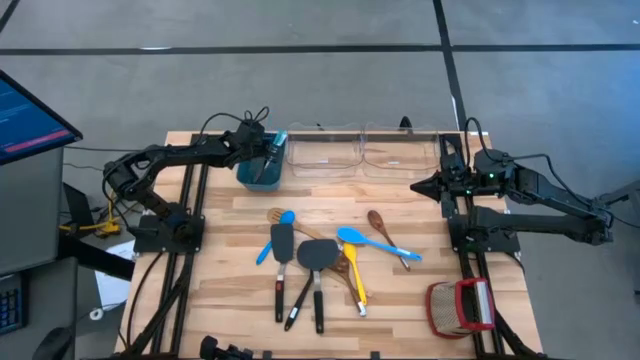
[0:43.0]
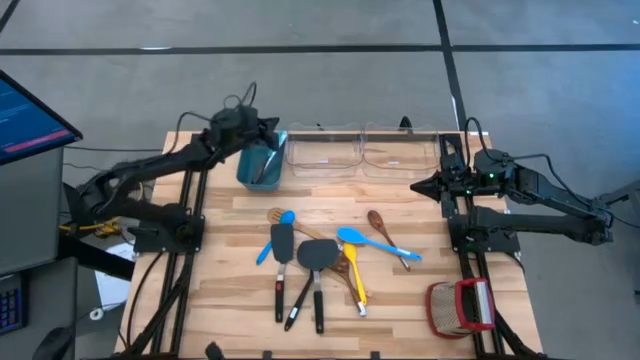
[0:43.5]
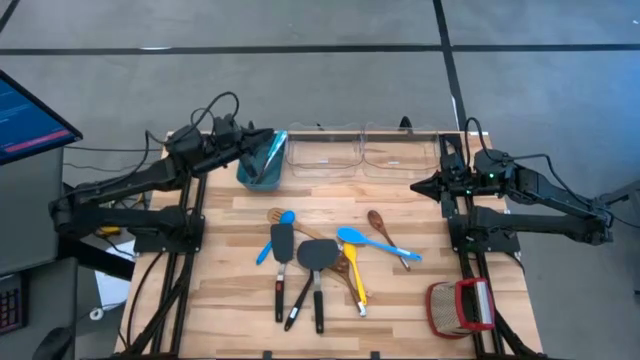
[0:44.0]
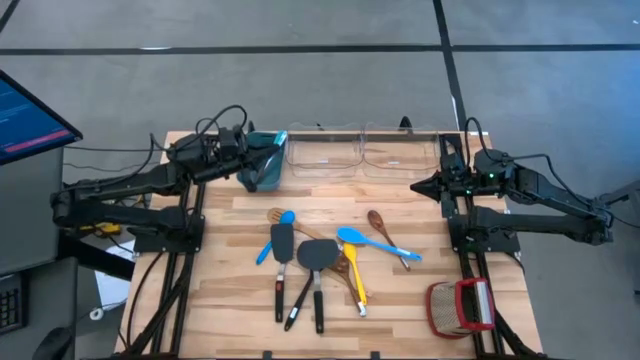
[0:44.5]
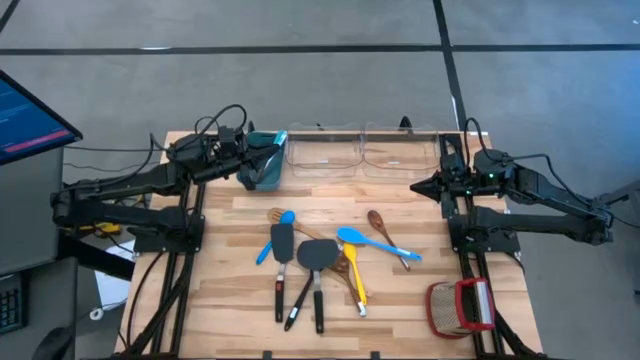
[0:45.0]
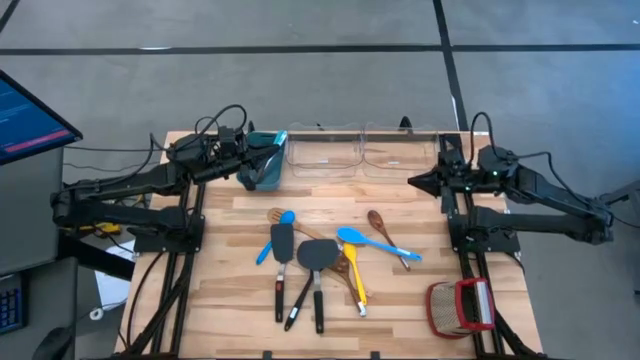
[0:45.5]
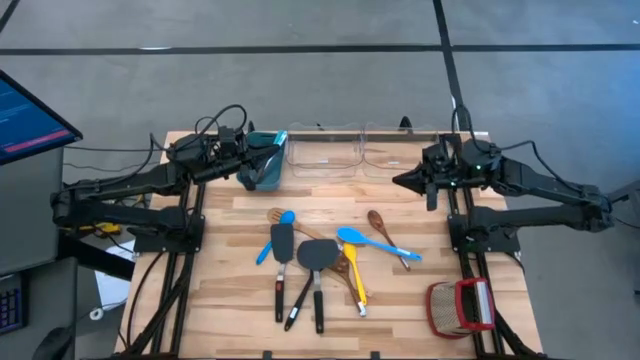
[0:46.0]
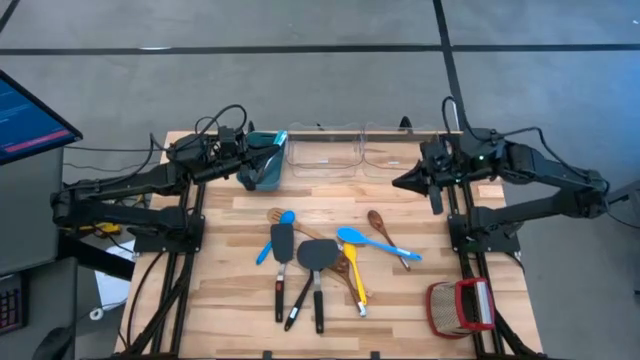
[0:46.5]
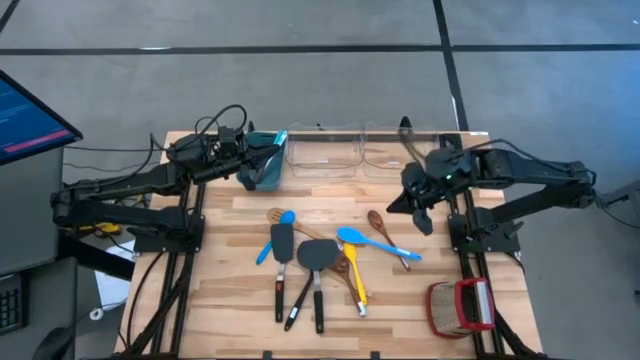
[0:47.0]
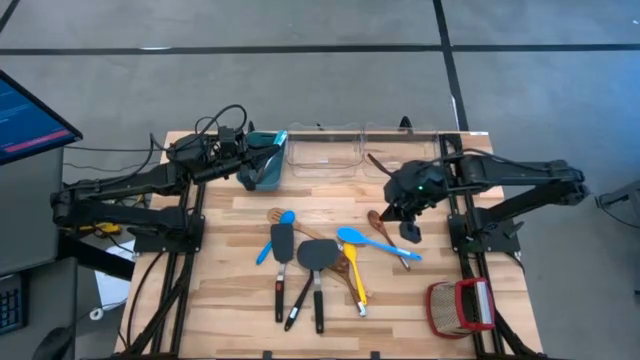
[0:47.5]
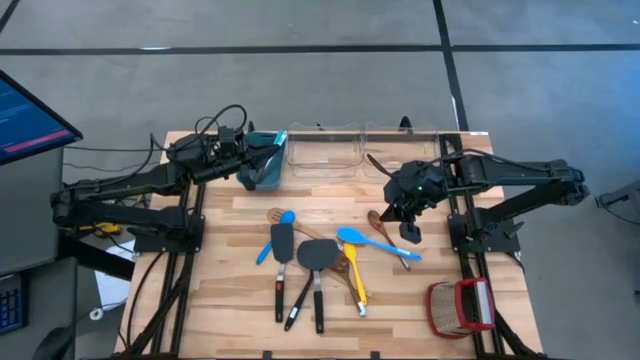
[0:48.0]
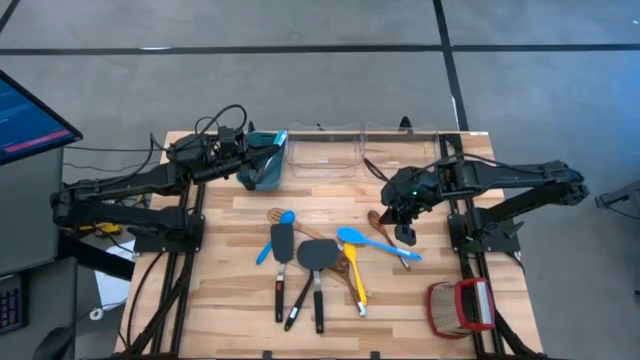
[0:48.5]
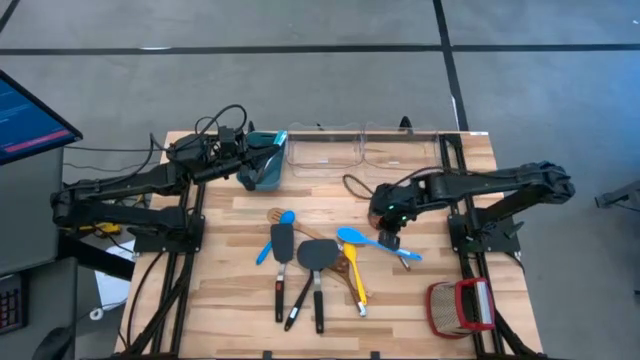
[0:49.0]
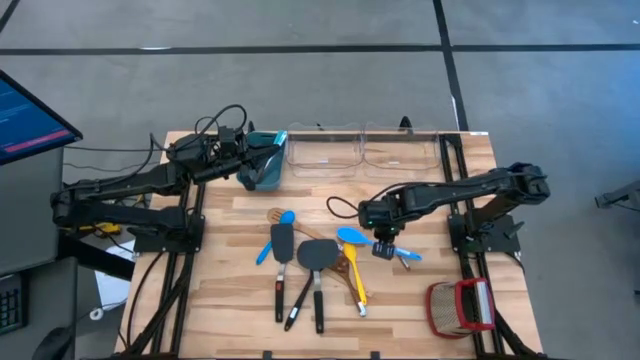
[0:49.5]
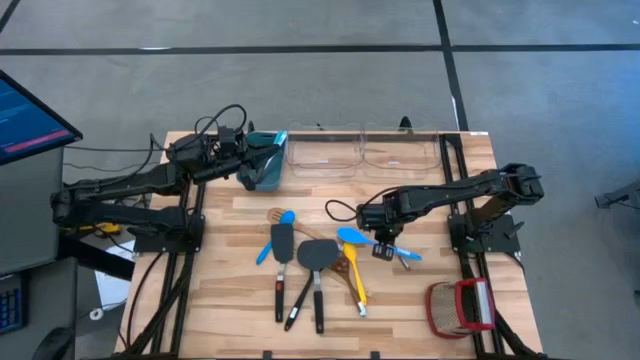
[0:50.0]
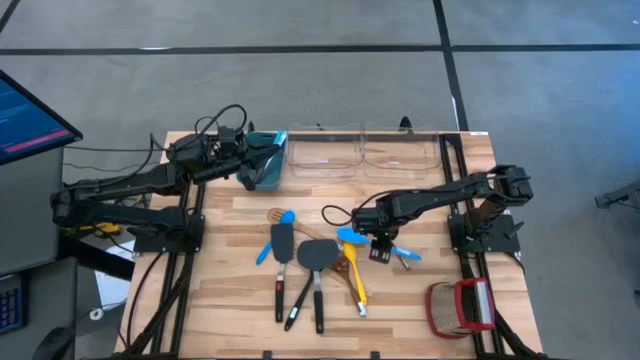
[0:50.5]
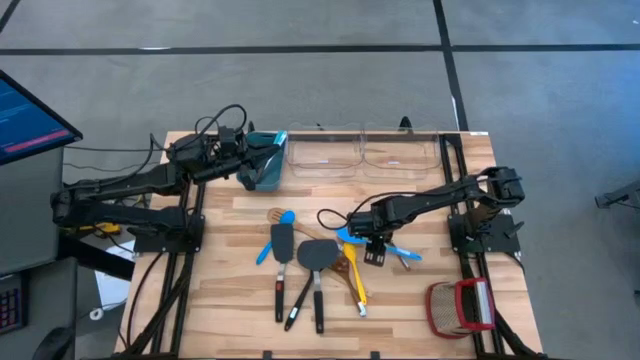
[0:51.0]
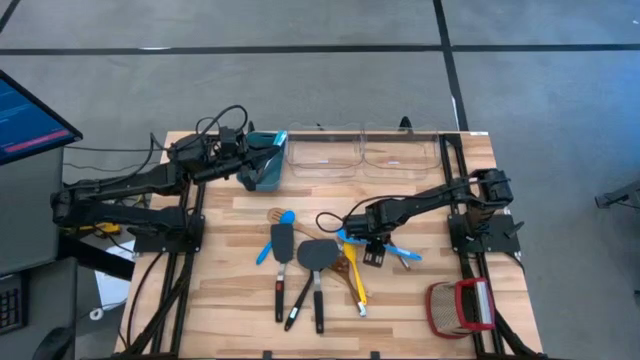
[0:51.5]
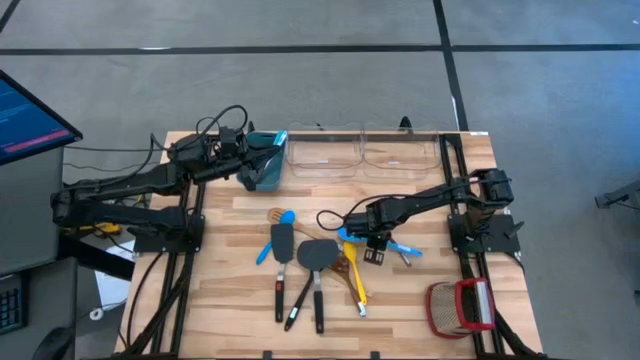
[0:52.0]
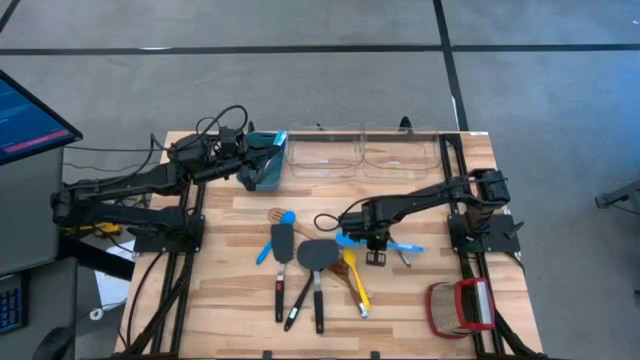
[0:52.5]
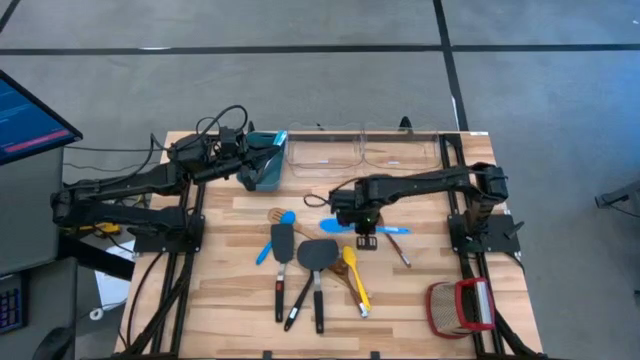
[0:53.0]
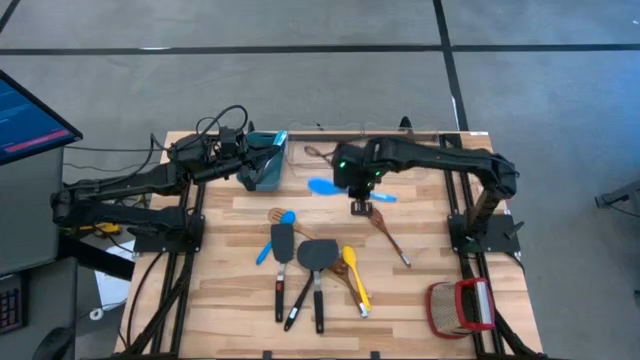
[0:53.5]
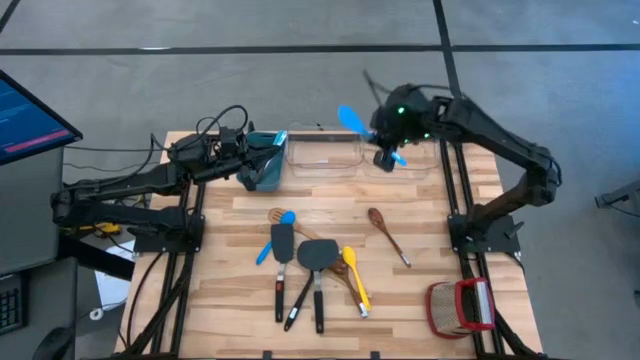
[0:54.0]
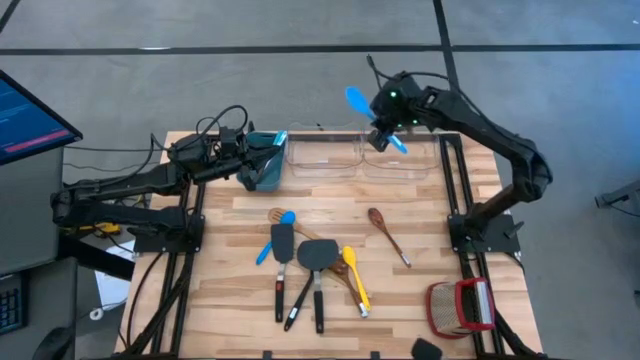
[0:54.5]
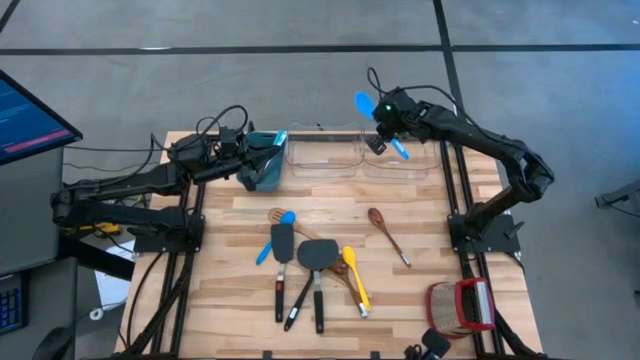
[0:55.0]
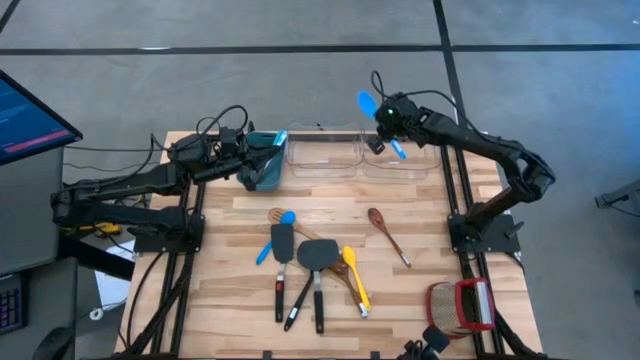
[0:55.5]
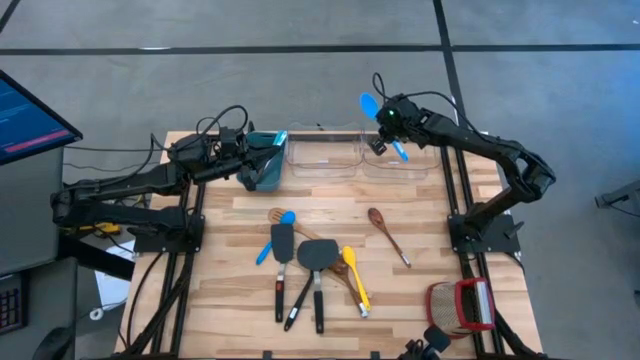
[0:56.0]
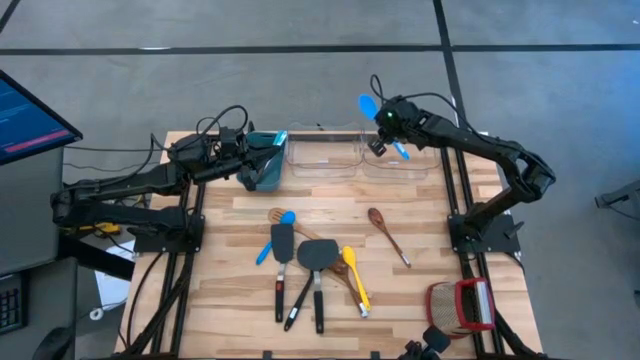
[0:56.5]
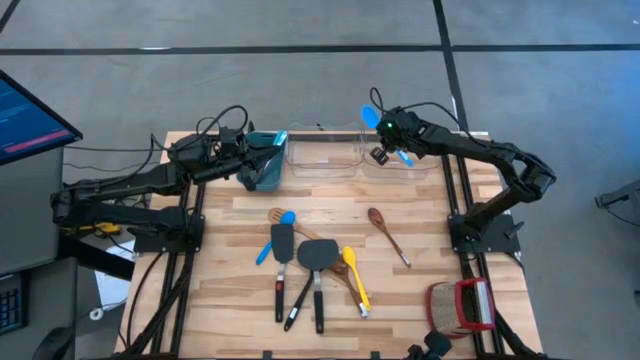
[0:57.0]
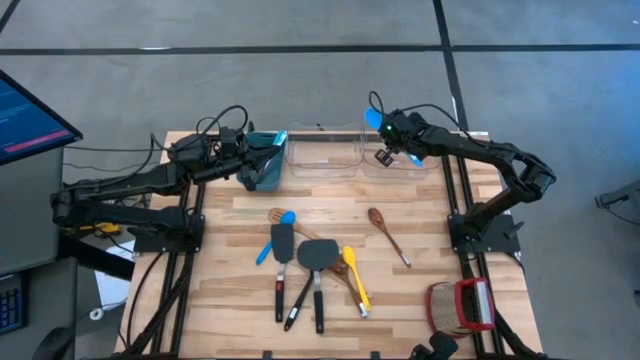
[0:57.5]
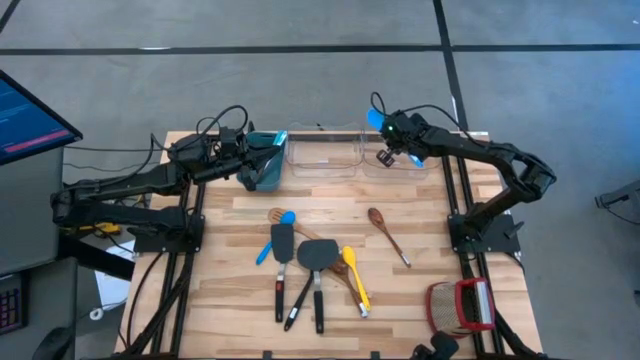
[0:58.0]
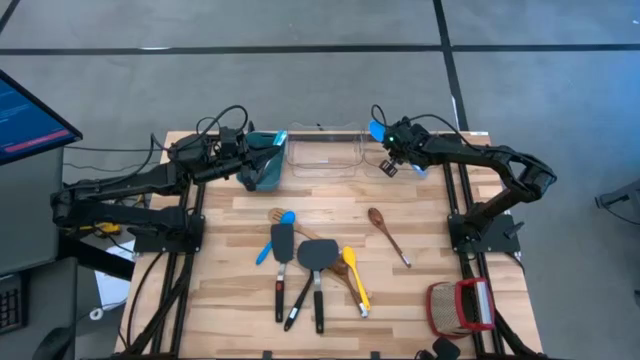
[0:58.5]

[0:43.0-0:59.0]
Task: Pick & Place Kitchen Items
Put the blue serving spoon into the right transparent bin

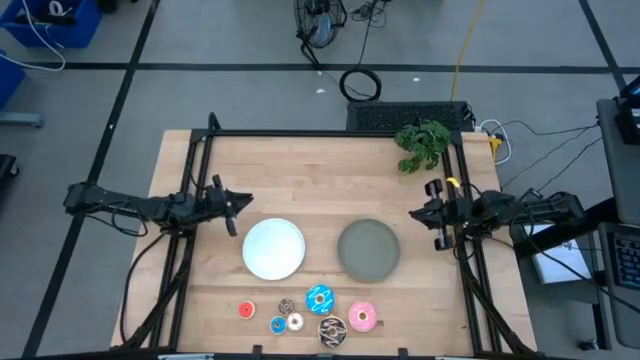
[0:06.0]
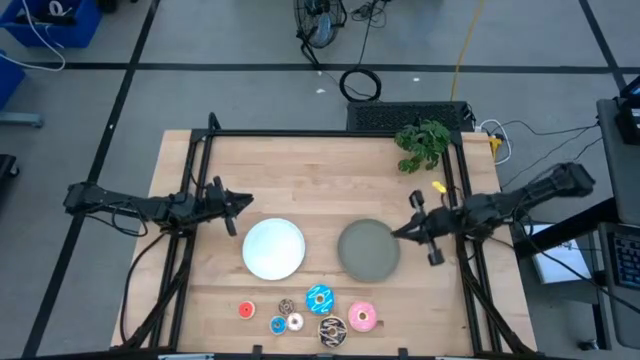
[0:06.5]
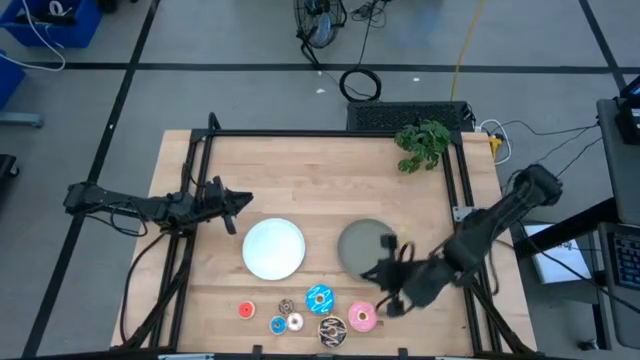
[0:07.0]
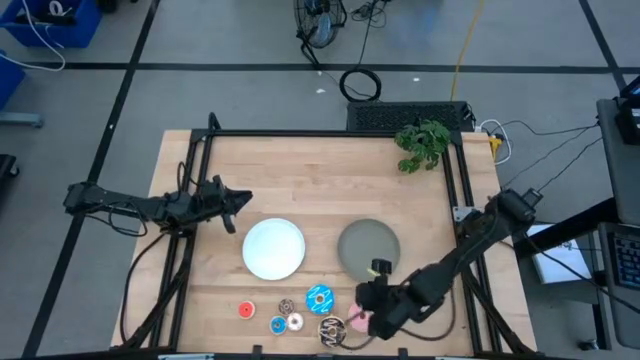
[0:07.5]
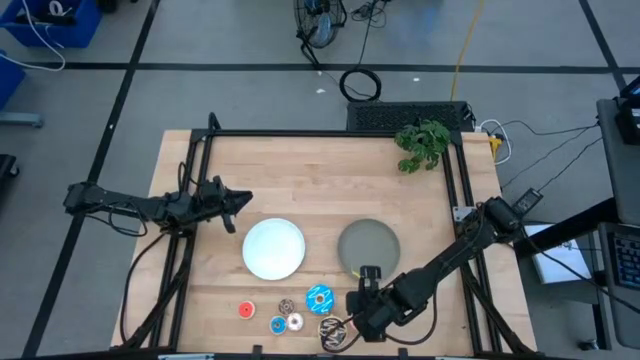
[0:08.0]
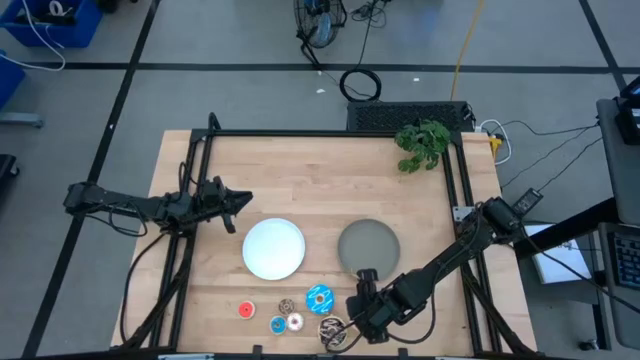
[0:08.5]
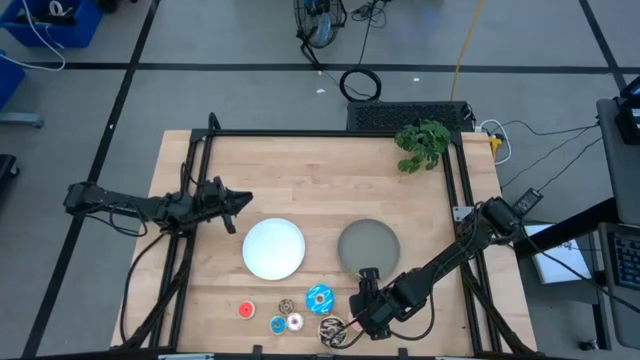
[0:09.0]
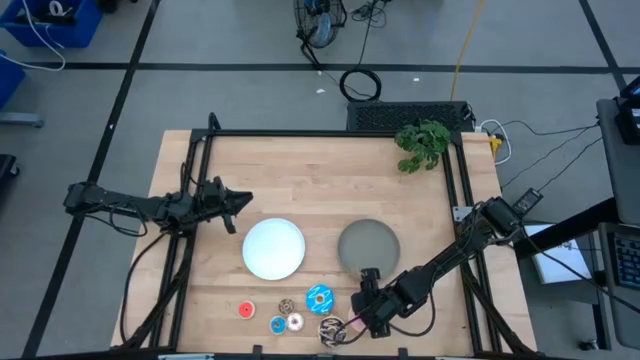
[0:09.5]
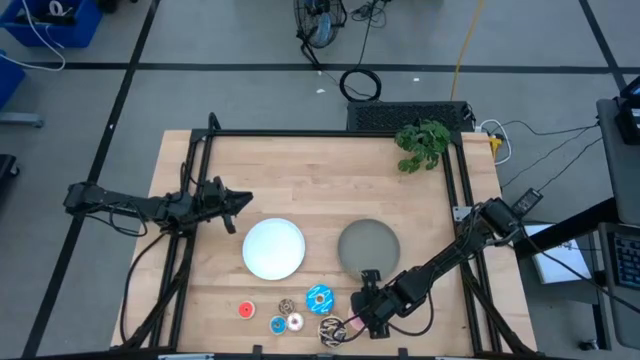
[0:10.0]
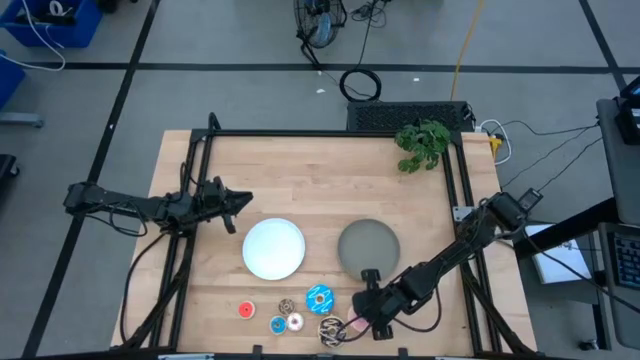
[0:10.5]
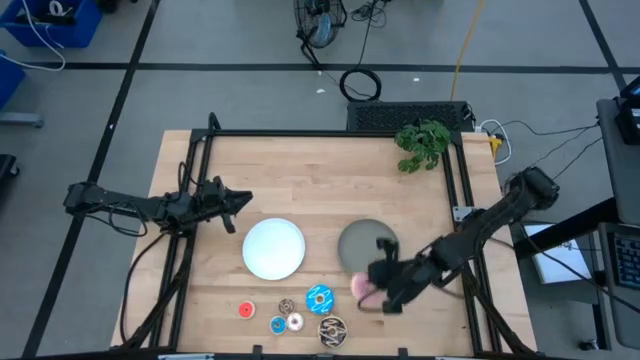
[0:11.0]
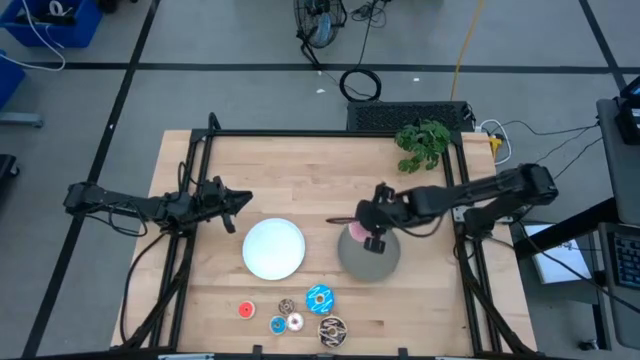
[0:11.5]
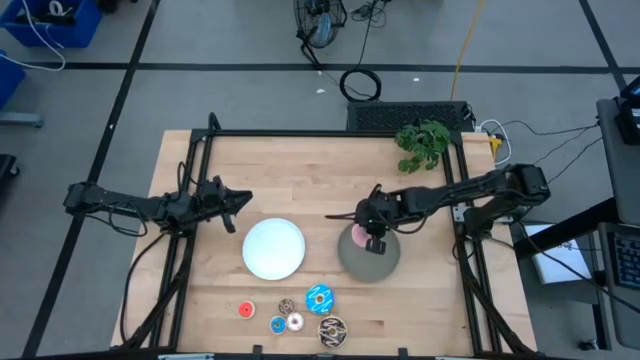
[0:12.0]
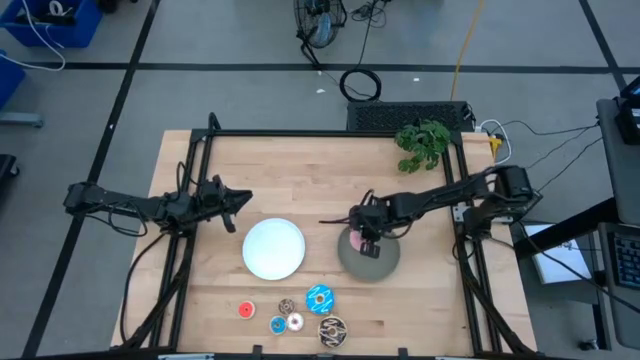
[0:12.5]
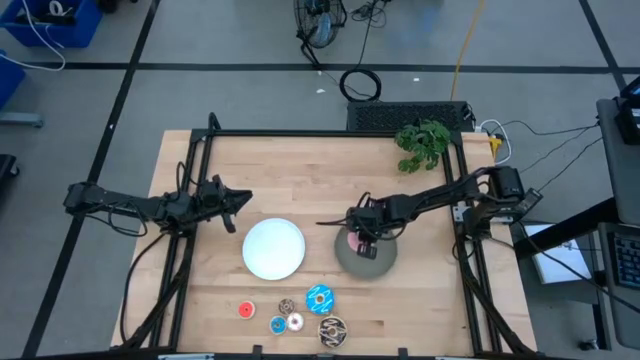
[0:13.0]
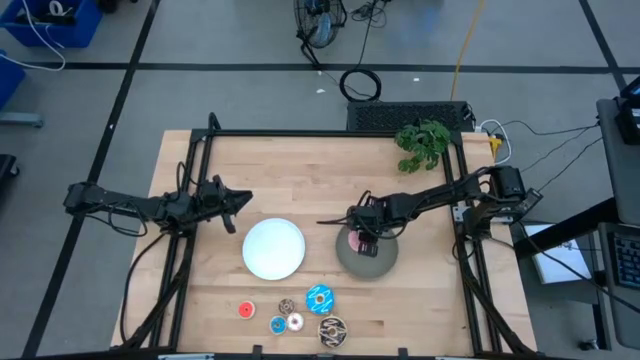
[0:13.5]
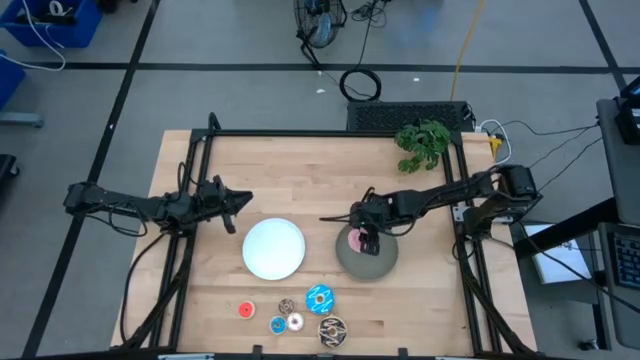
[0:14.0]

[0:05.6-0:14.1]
Task: Pick & Place donuts
Put the big pink donut on the gray plate
